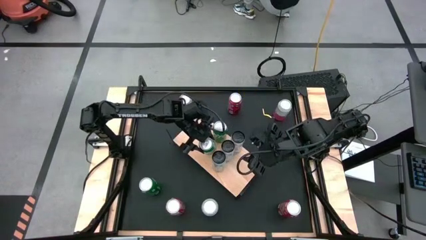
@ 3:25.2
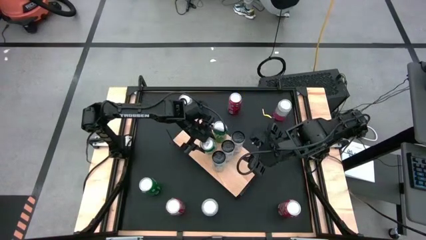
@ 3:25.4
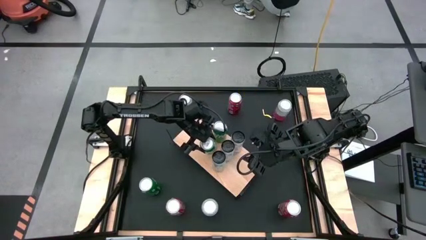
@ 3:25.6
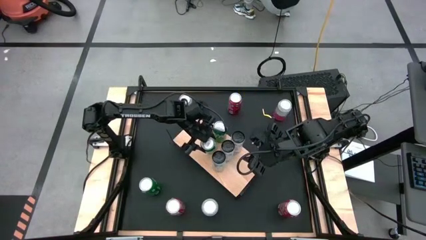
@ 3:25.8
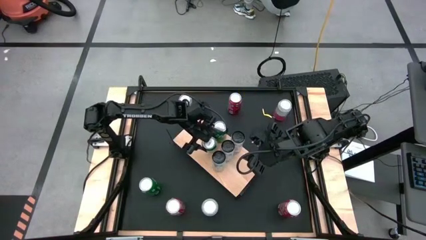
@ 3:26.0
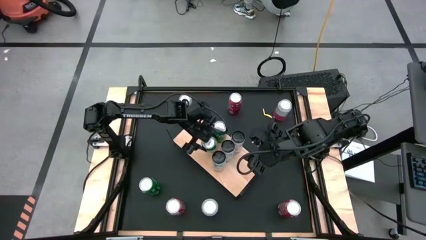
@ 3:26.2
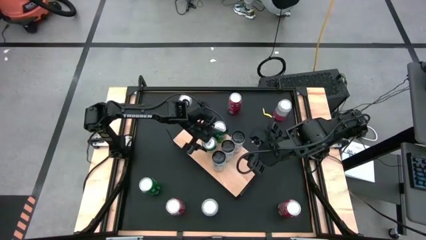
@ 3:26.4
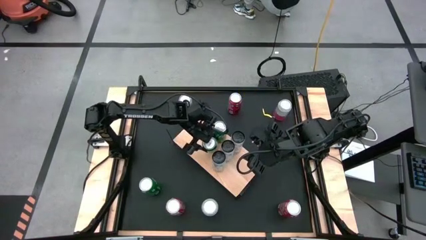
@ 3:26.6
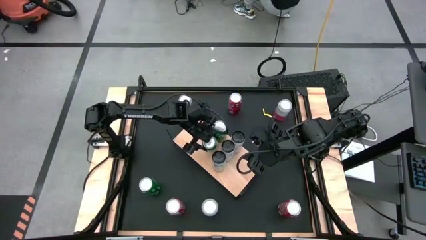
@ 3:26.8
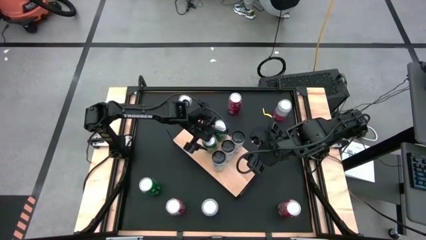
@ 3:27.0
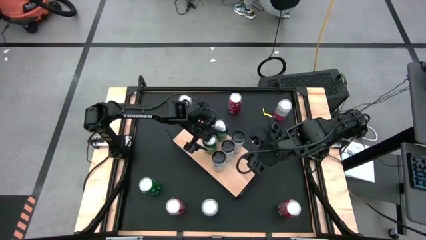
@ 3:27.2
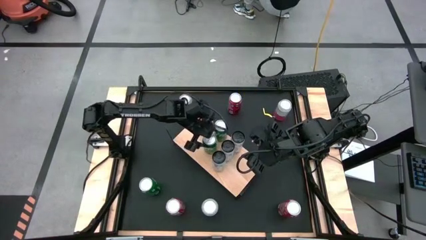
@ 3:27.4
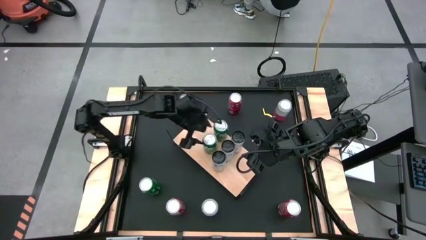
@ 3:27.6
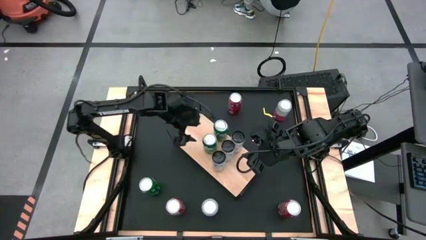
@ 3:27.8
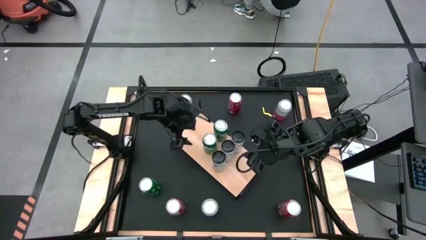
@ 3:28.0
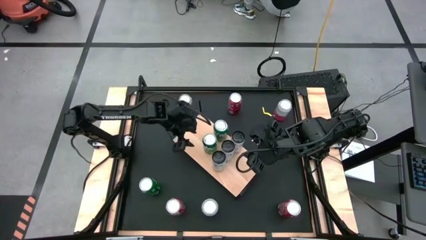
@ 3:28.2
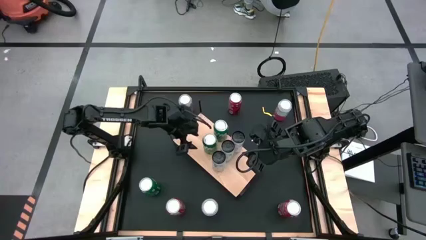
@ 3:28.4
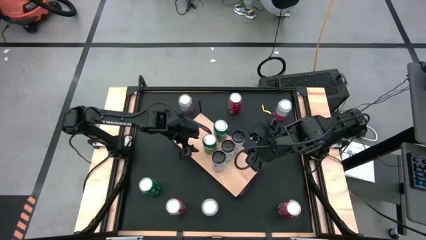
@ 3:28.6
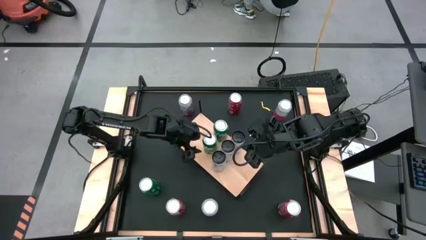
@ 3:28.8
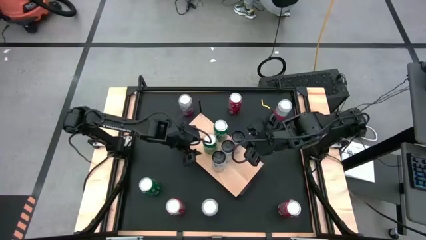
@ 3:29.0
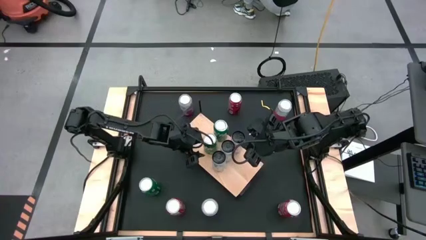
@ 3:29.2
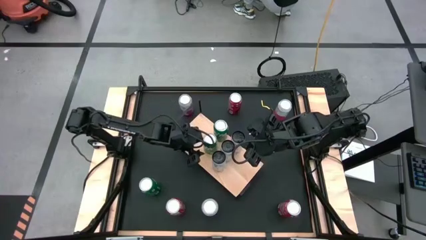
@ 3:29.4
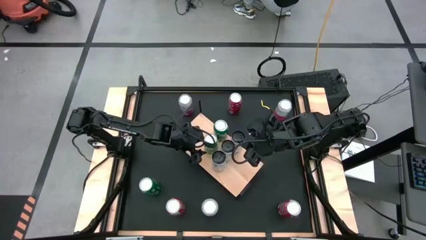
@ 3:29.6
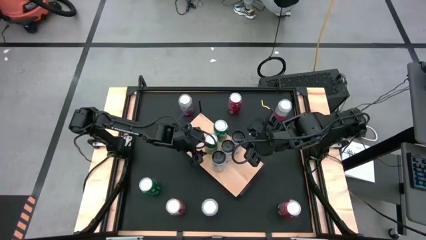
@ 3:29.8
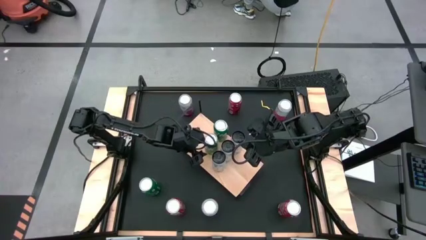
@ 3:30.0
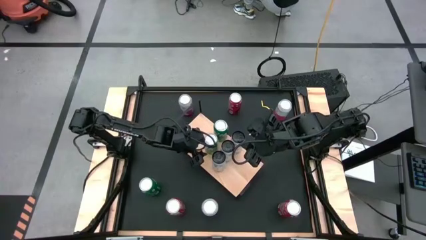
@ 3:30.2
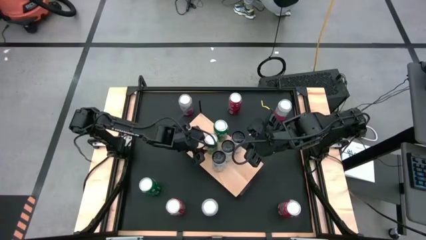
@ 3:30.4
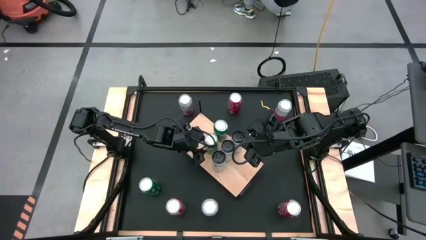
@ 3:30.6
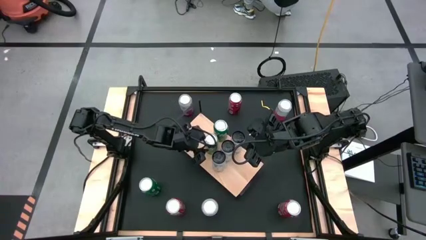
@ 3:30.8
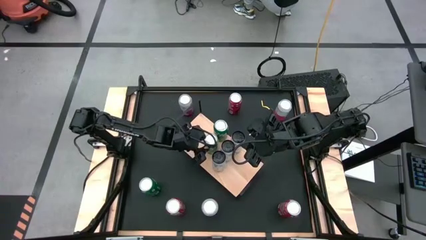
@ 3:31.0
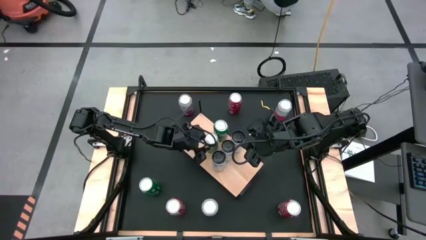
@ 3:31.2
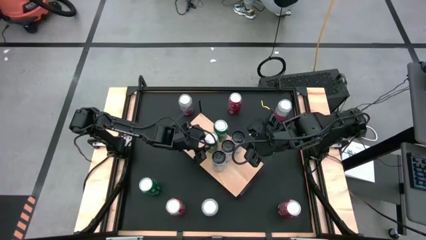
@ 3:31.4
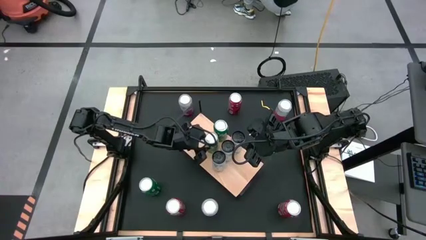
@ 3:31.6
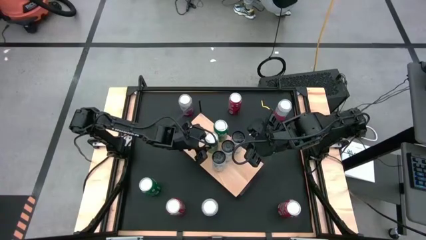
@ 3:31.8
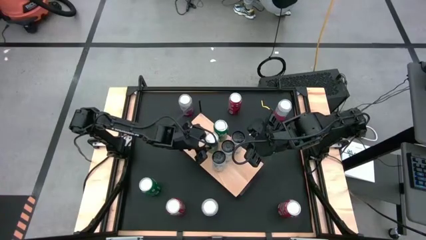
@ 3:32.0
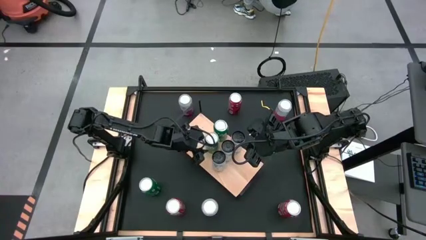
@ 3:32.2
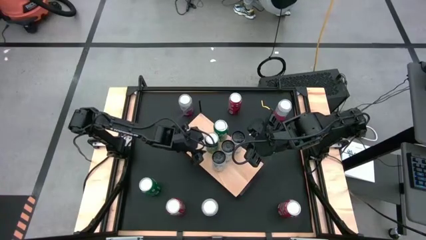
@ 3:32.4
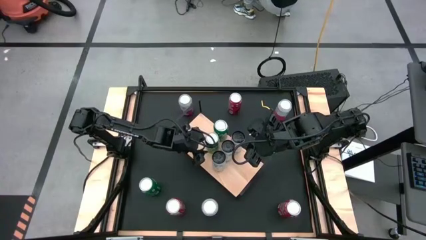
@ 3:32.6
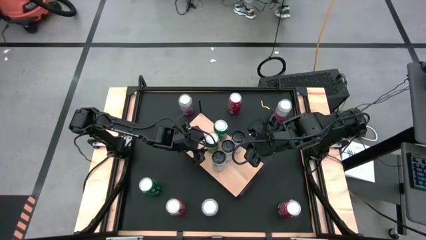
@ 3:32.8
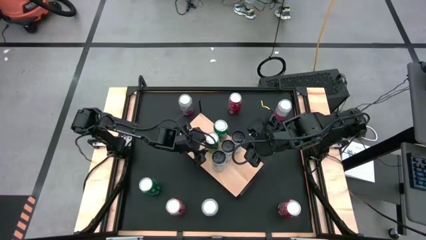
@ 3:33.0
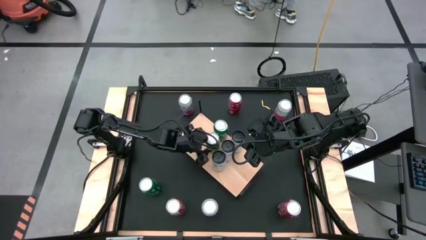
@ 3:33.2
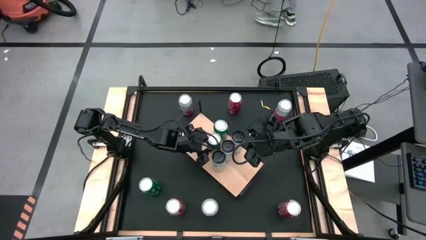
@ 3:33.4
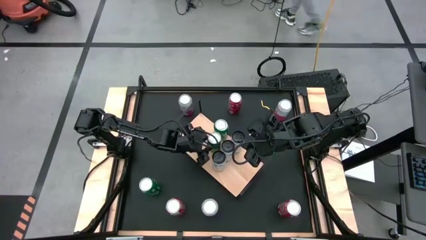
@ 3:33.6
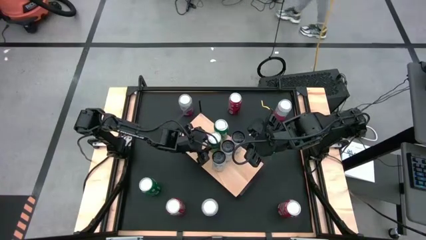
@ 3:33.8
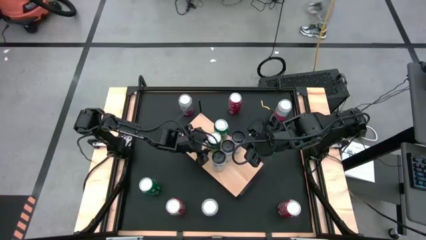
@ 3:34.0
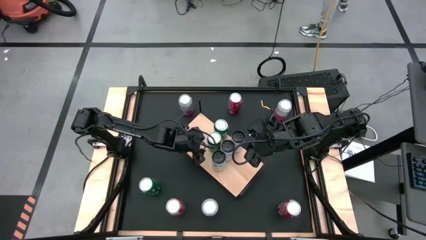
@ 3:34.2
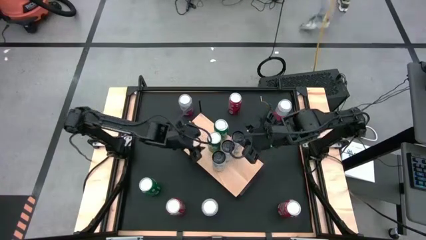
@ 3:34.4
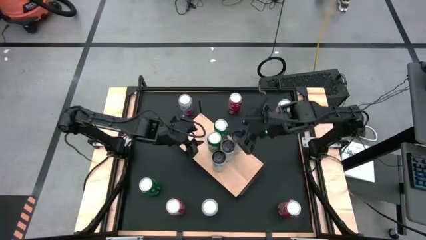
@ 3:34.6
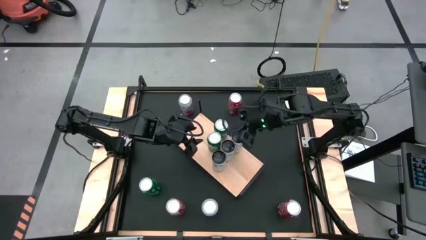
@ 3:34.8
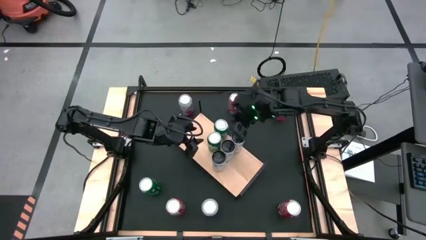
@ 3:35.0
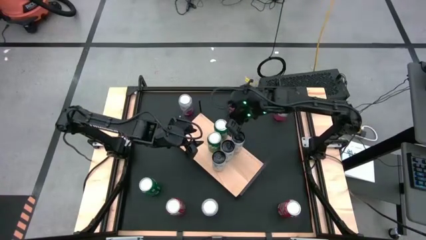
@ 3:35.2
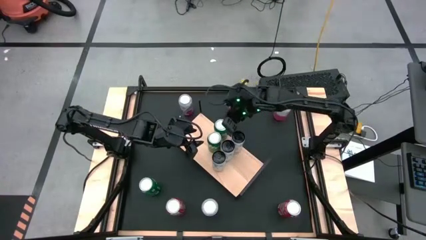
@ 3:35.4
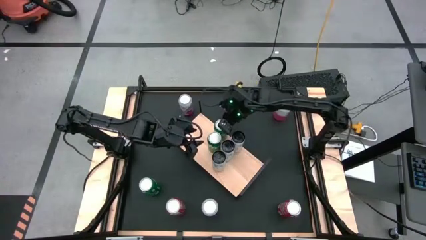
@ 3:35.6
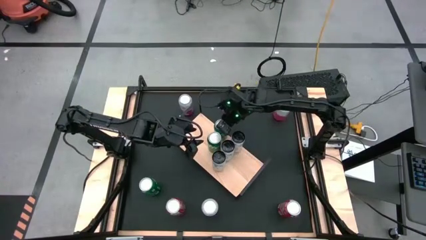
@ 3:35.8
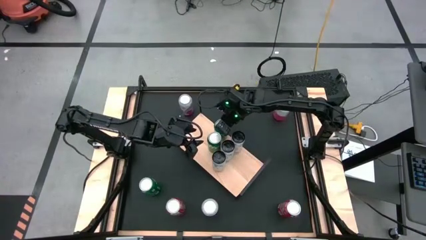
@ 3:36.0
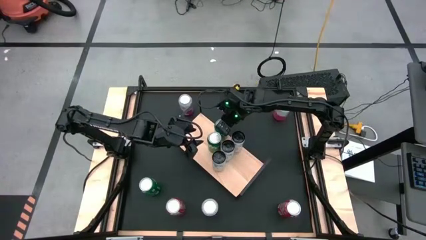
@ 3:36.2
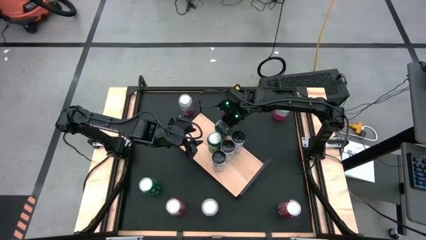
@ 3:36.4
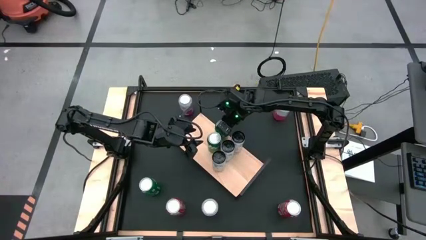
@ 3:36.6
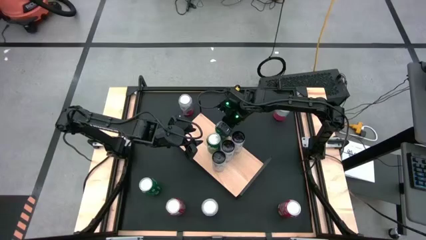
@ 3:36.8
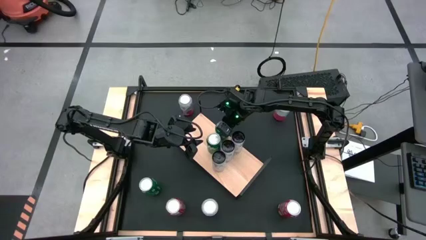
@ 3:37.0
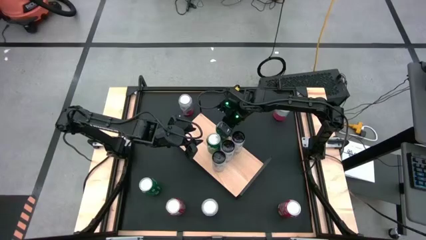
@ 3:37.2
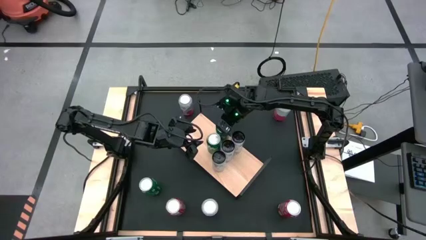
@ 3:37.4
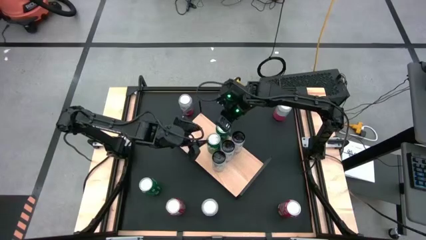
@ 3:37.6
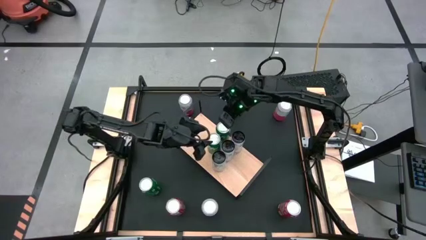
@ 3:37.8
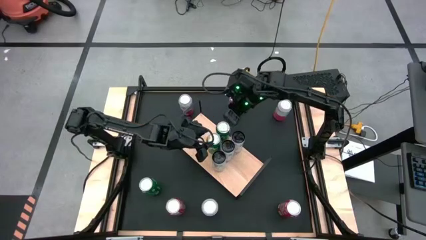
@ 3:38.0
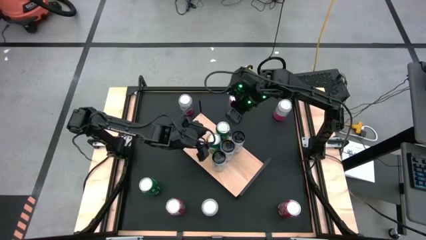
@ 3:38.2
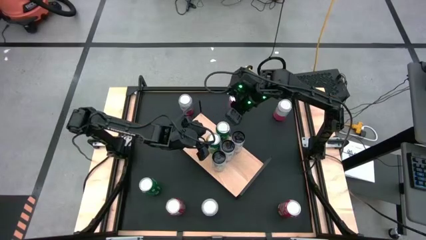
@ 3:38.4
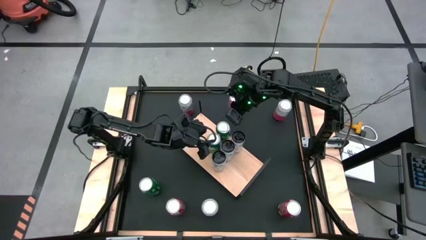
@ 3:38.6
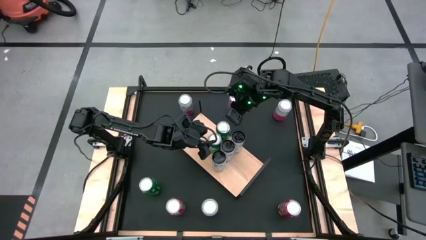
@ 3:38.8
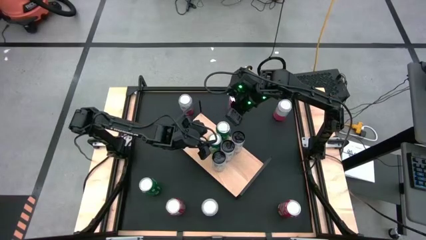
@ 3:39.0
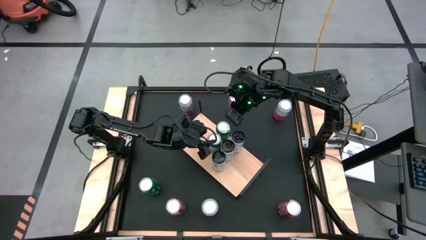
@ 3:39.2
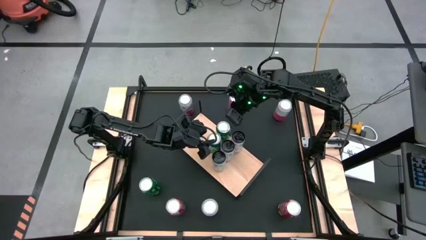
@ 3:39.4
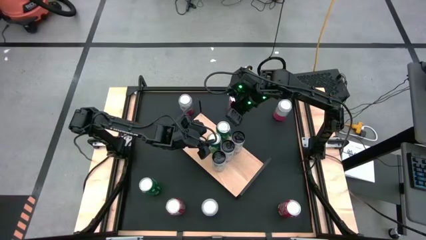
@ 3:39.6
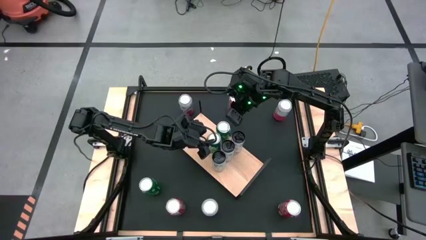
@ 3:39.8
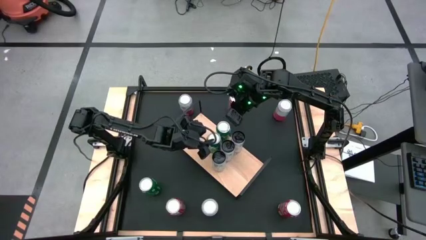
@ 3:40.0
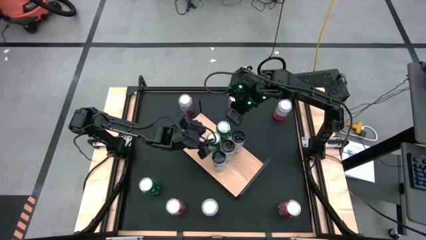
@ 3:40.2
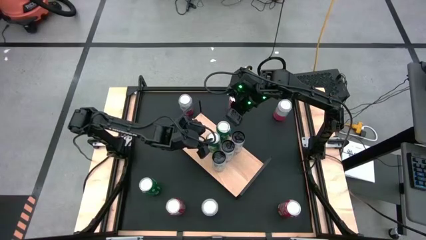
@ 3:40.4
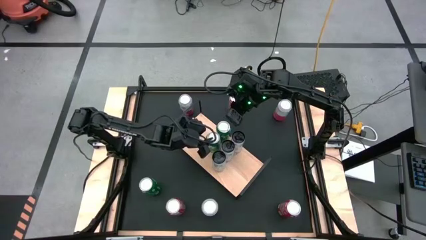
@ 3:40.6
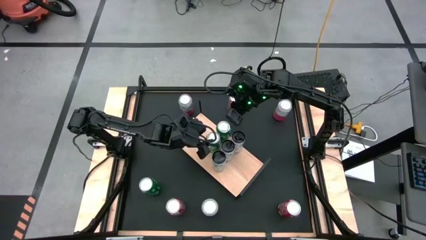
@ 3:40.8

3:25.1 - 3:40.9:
Task: Place canned beverage on shelf
Put the top green soda can aligned with the other top green soda can
